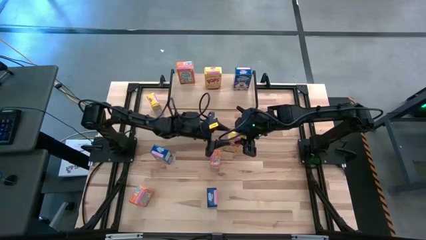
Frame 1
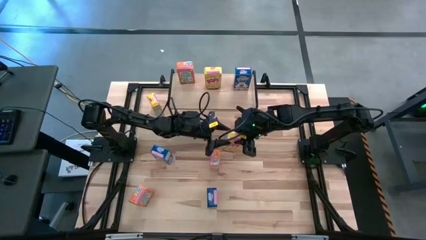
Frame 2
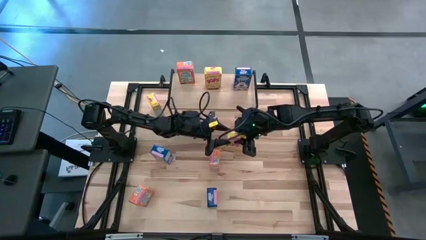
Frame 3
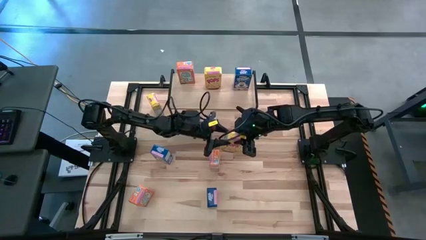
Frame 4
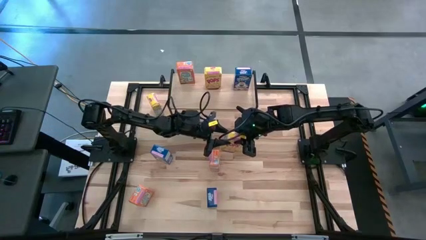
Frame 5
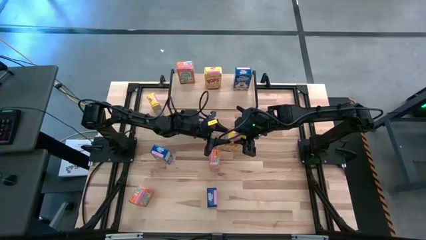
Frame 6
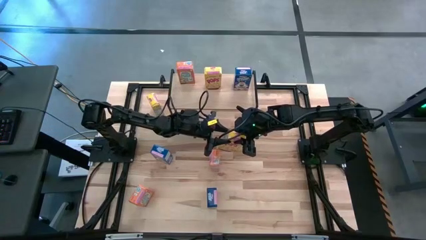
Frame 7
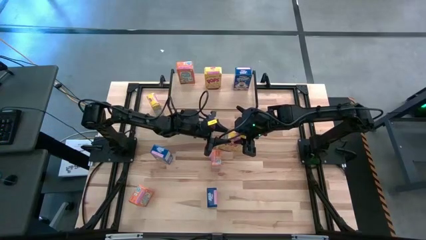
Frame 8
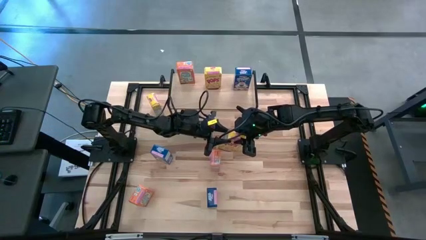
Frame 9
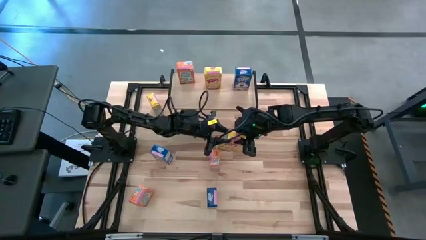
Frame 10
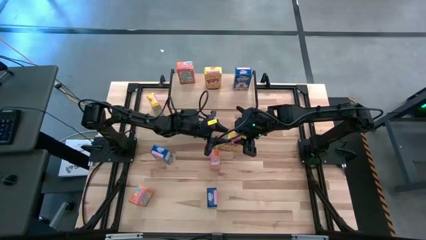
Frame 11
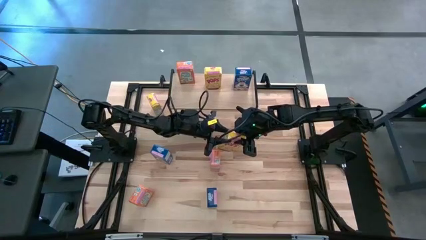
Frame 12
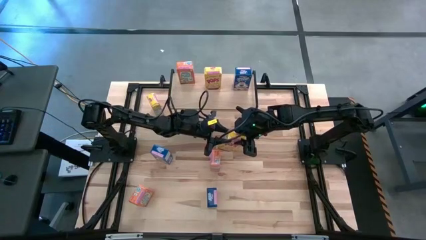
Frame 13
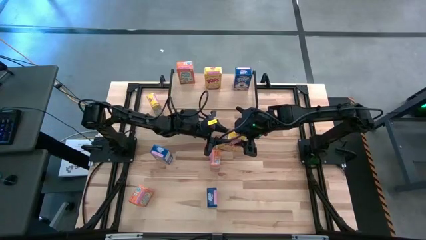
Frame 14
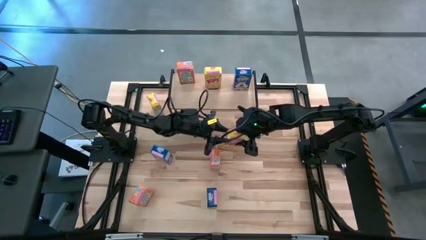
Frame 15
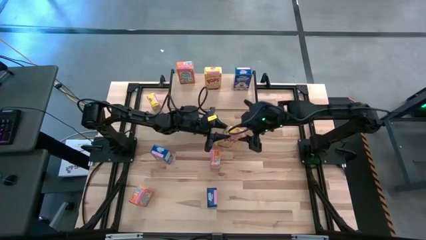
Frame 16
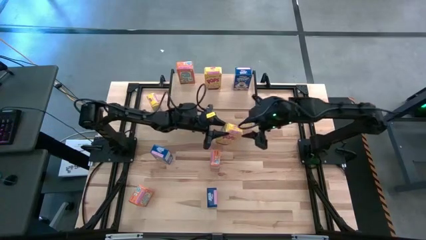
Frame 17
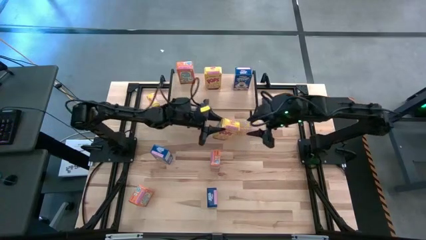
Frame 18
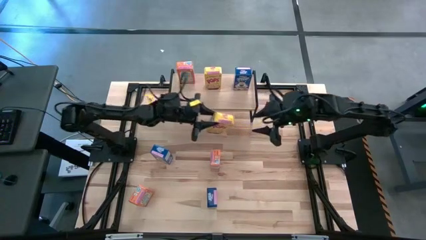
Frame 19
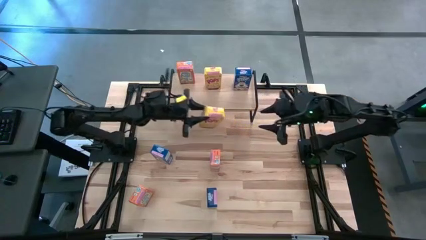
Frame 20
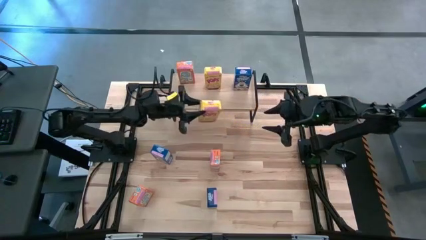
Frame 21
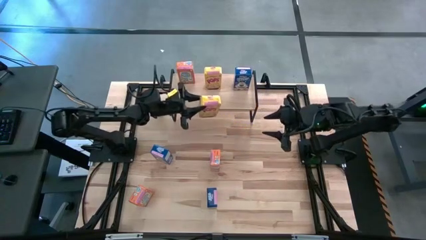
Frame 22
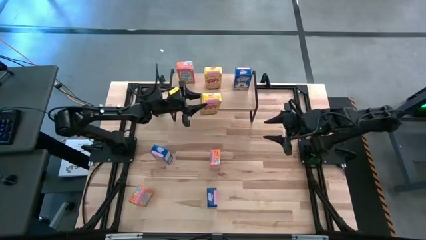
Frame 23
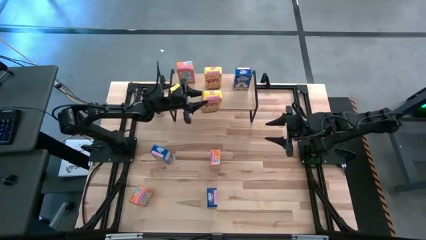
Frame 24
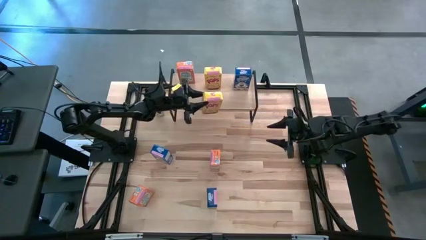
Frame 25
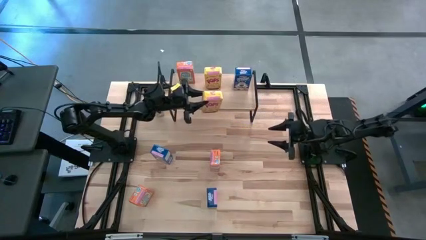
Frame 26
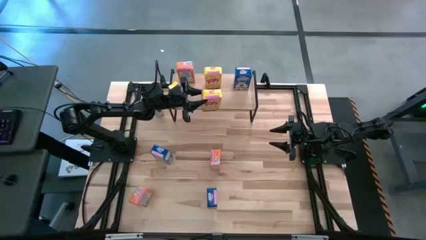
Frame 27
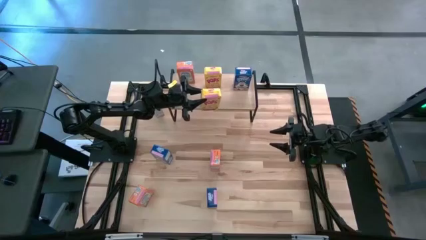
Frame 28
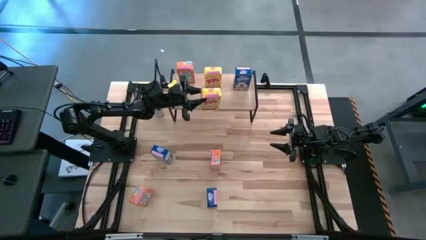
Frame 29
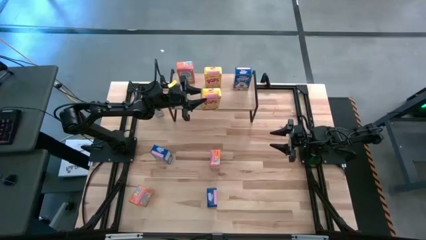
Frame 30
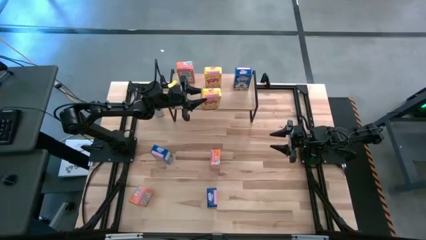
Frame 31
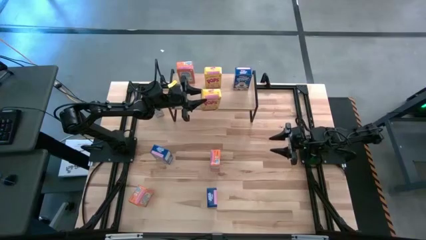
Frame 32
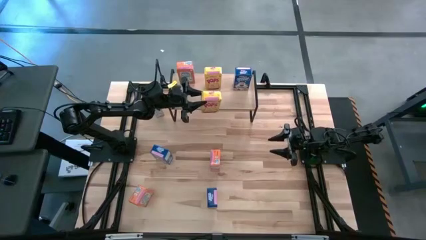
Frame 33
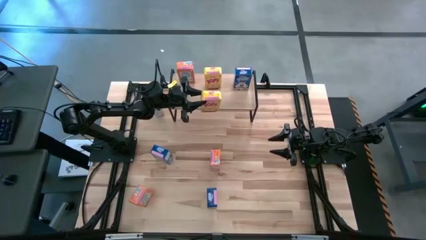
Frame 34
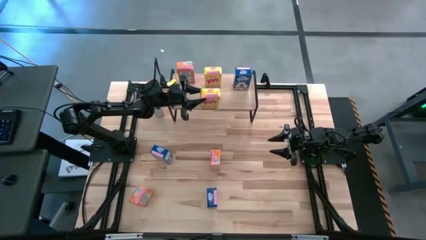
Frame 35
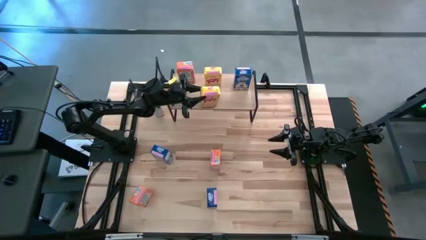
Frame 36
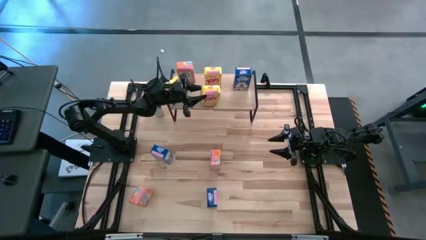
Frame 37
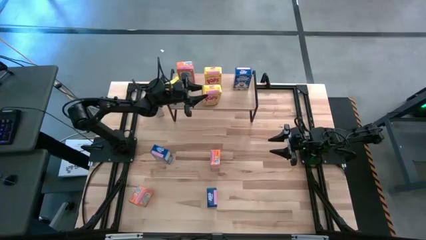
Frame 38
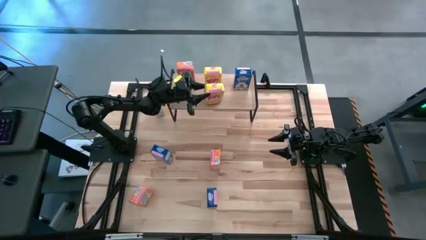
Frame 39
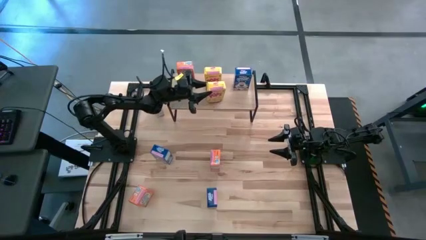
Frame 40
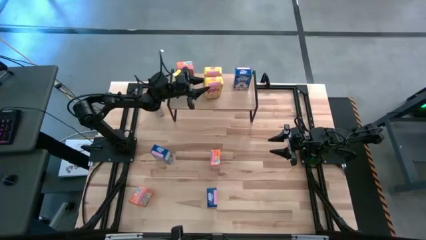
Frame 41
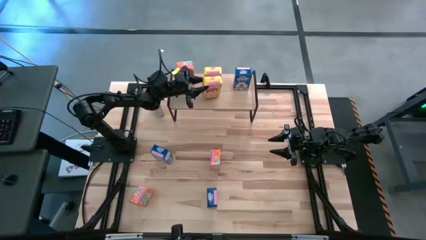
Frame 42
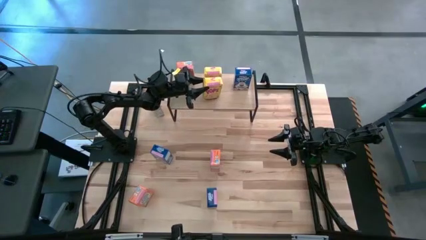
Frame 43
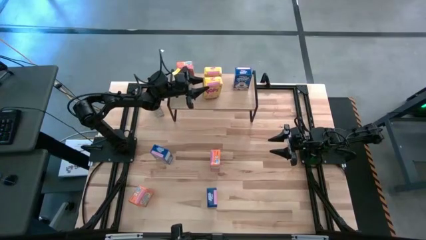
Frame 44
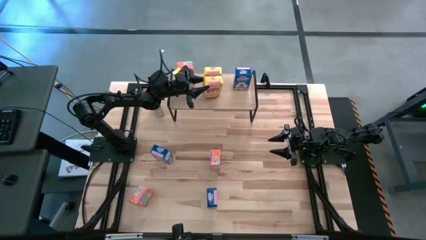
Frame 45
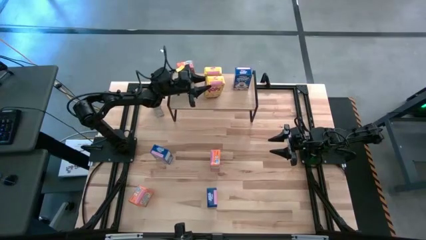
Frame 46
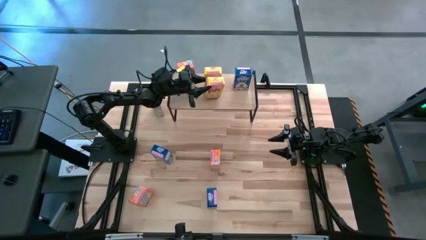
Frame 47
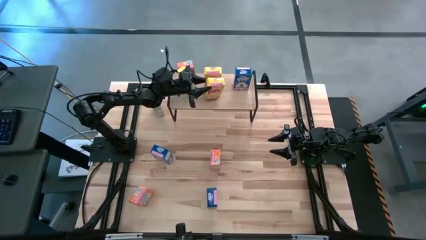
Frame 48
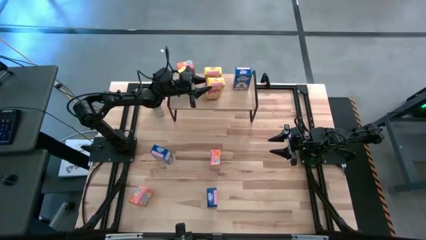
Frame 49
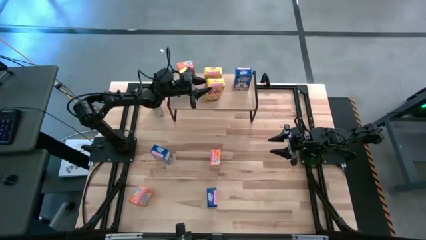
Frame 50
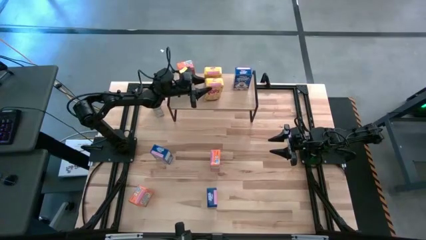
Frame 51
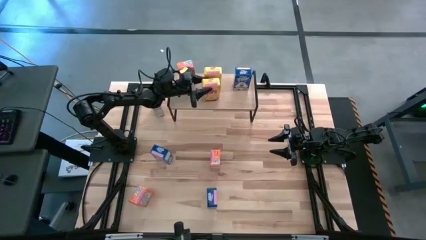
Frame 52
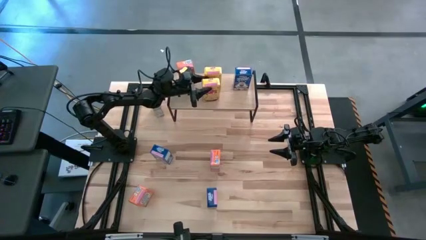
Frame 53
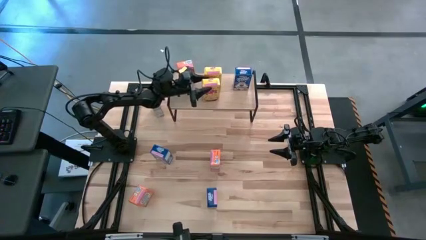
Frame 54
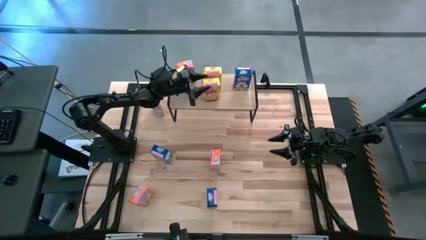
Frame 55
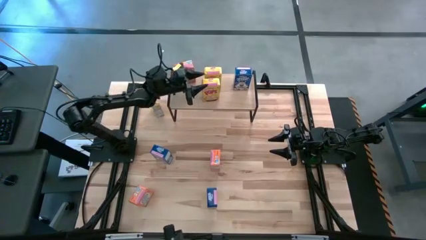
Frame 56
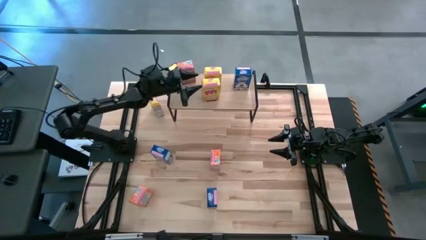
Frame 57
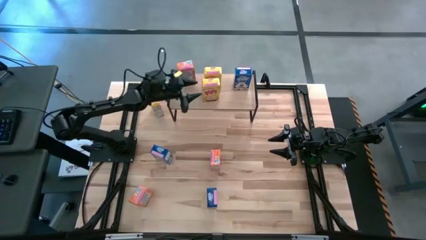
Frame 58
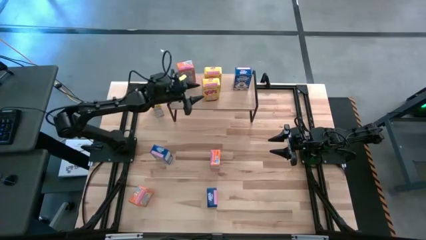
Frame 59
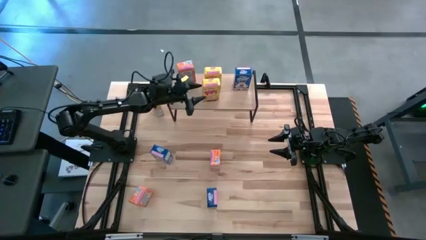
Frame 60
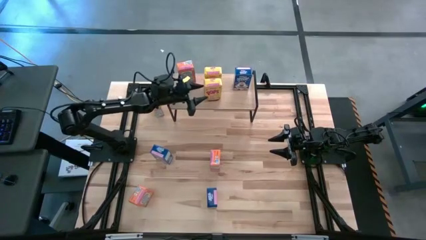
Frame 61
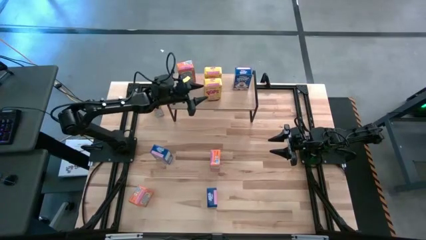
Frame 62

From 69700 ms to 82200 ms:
Task: Stack cereal on shelf
Put the right yellow cereal box on the shelf aligned with the other yellow cereal box
